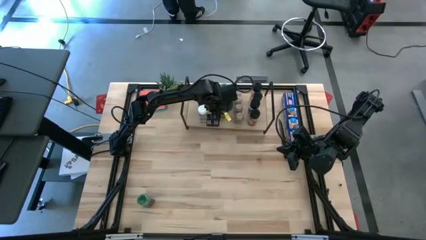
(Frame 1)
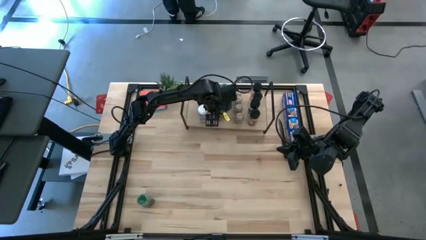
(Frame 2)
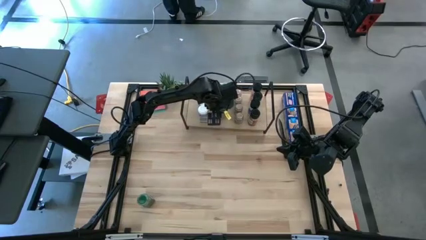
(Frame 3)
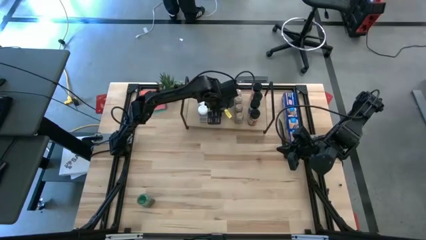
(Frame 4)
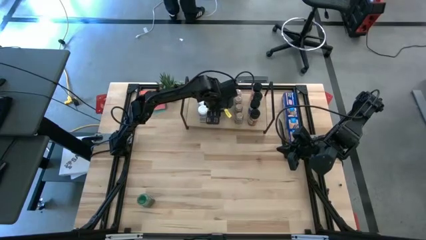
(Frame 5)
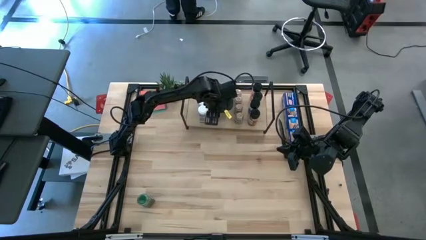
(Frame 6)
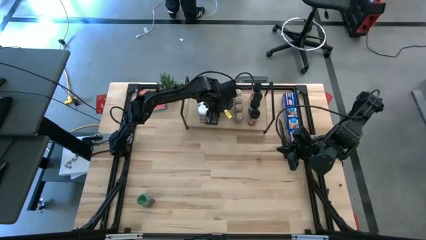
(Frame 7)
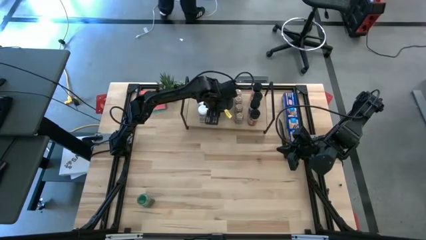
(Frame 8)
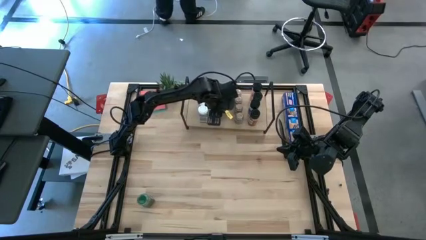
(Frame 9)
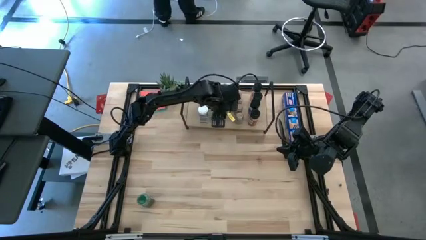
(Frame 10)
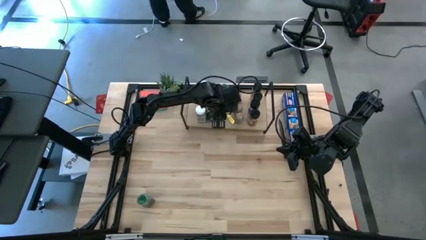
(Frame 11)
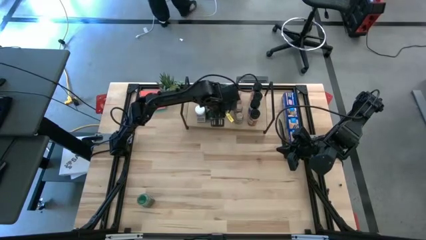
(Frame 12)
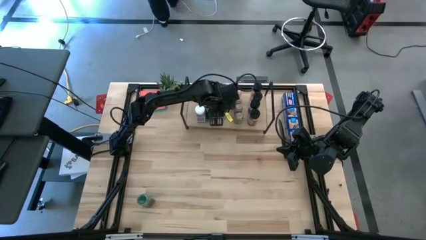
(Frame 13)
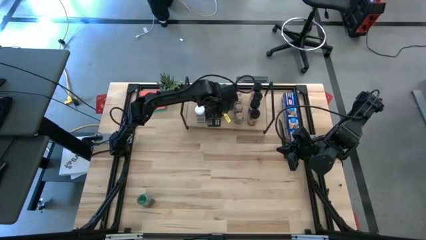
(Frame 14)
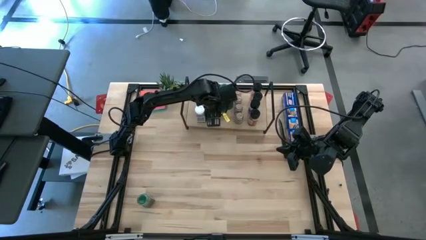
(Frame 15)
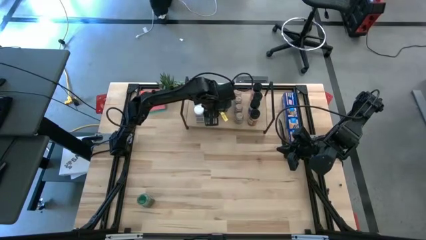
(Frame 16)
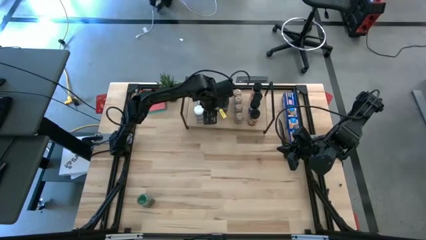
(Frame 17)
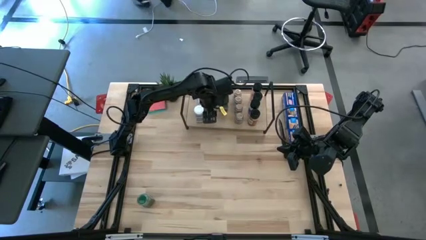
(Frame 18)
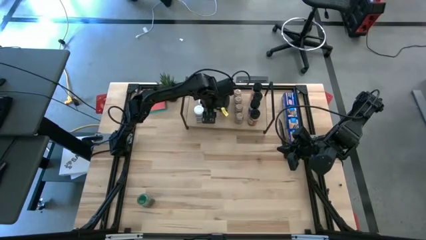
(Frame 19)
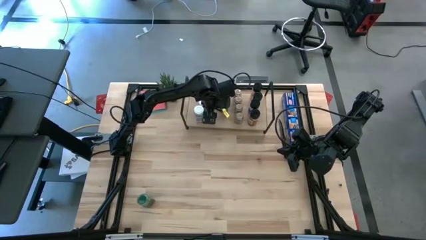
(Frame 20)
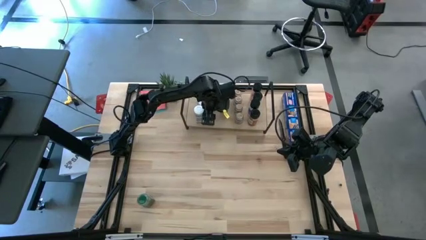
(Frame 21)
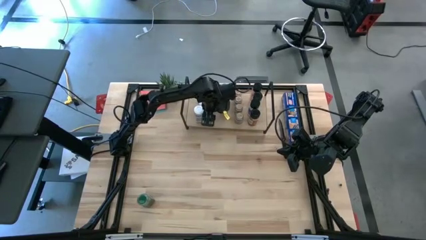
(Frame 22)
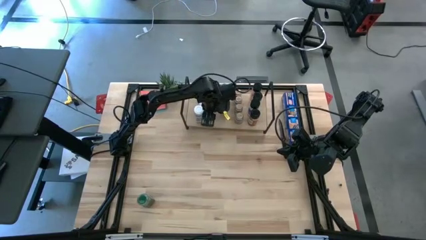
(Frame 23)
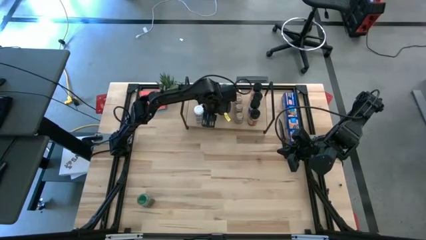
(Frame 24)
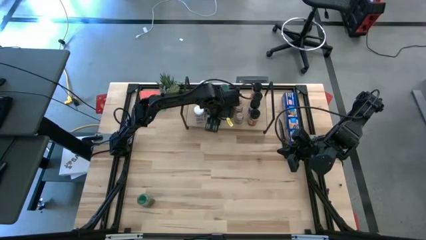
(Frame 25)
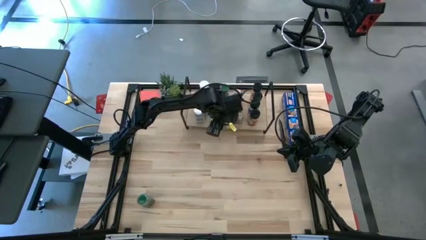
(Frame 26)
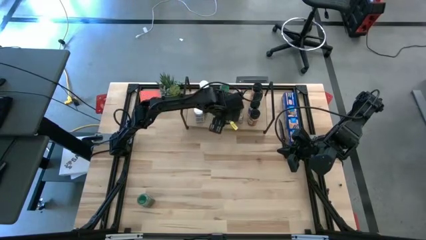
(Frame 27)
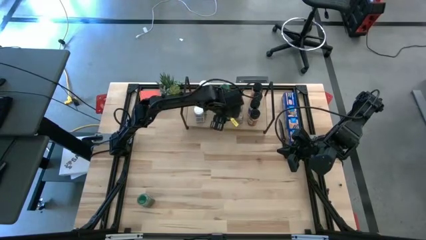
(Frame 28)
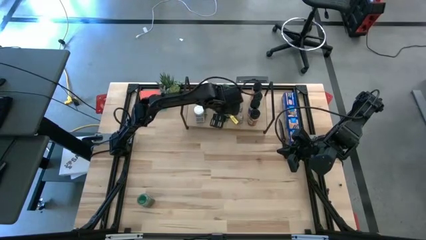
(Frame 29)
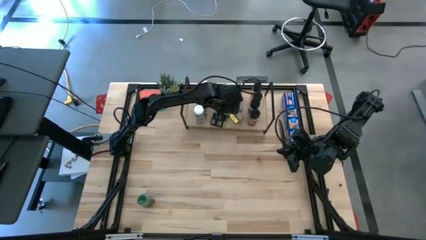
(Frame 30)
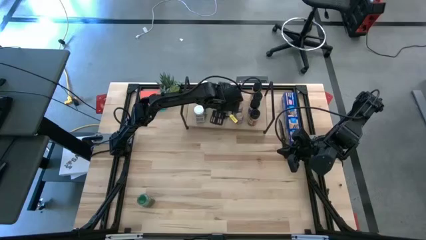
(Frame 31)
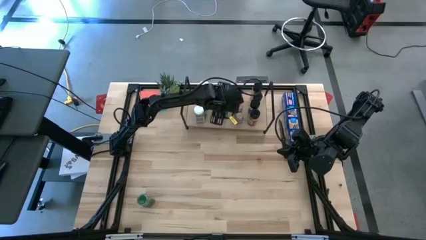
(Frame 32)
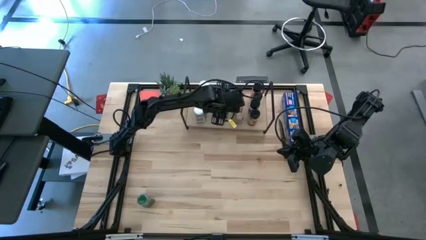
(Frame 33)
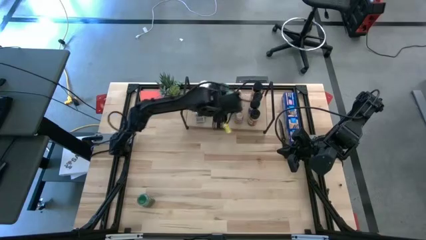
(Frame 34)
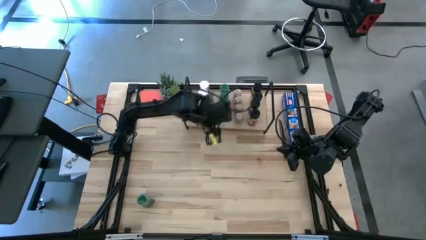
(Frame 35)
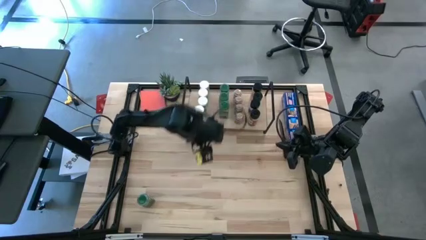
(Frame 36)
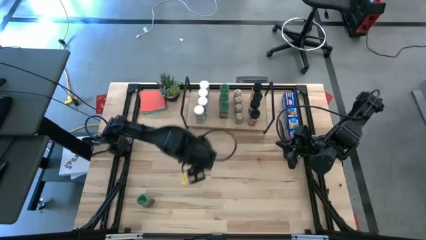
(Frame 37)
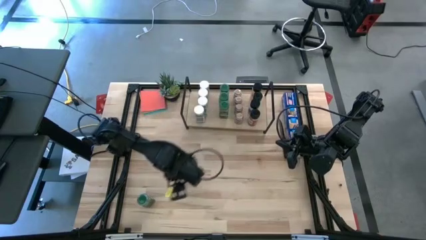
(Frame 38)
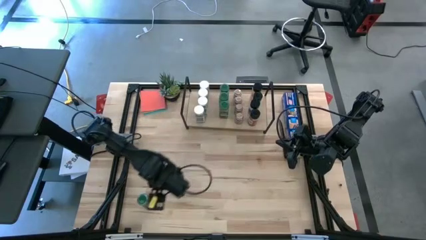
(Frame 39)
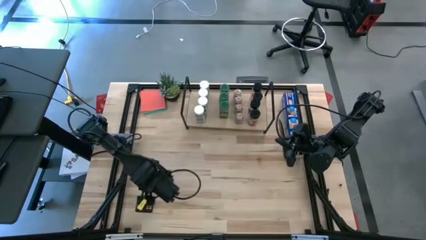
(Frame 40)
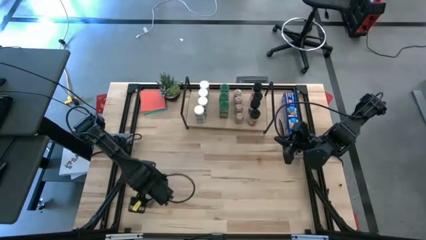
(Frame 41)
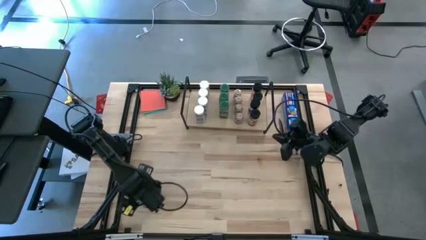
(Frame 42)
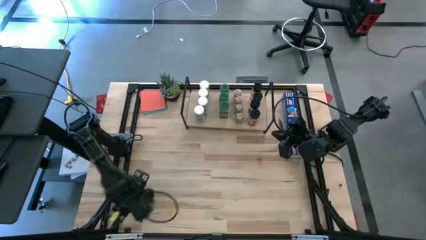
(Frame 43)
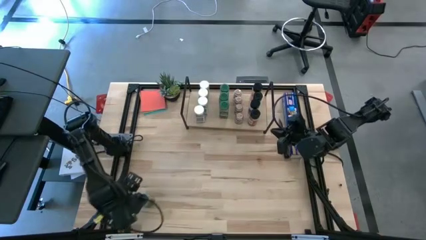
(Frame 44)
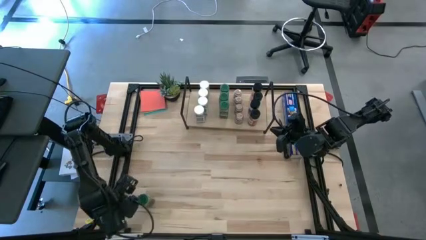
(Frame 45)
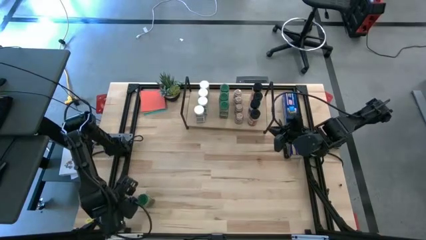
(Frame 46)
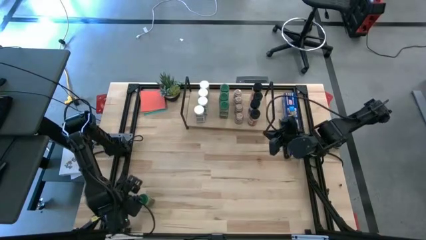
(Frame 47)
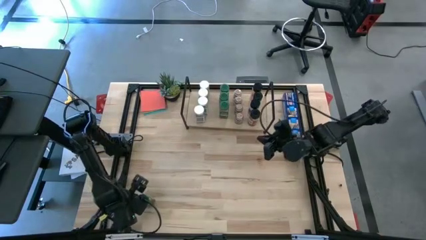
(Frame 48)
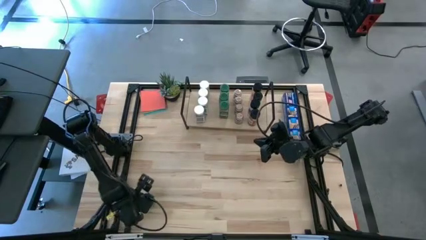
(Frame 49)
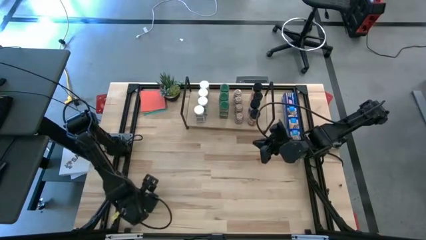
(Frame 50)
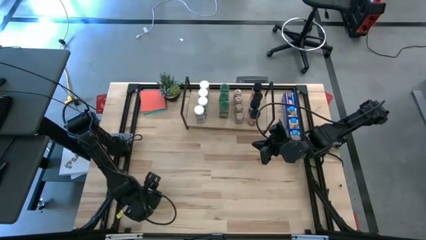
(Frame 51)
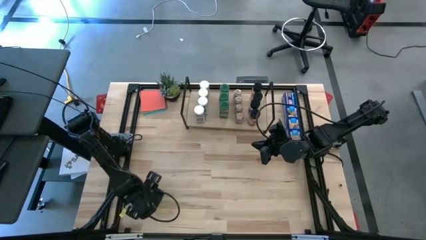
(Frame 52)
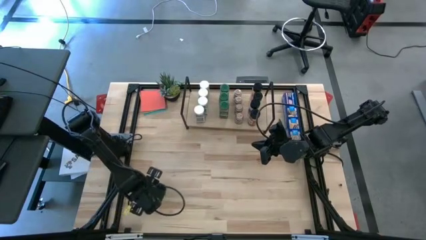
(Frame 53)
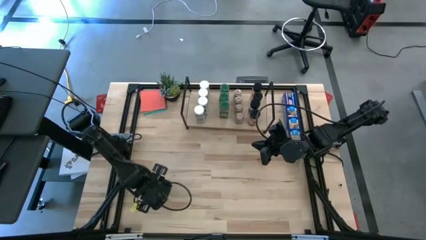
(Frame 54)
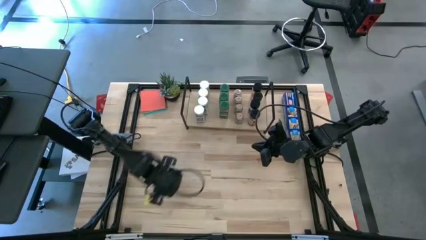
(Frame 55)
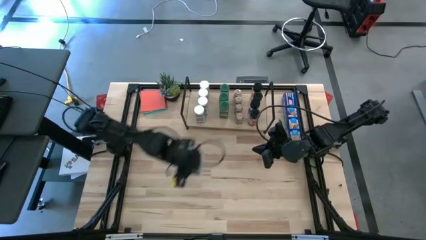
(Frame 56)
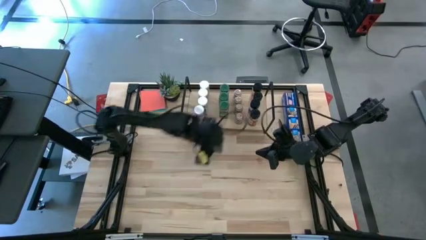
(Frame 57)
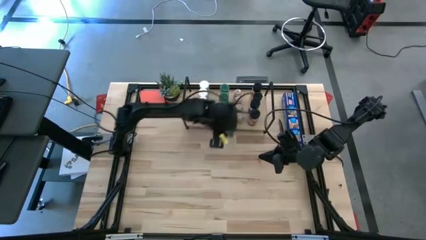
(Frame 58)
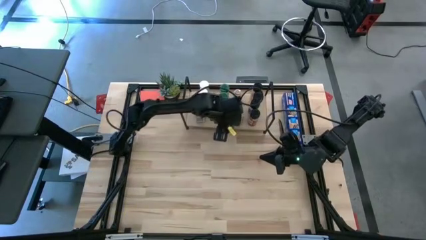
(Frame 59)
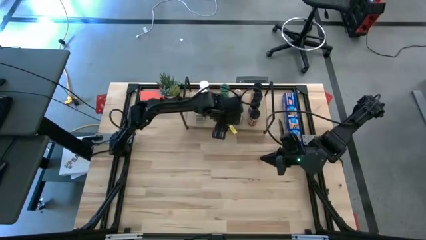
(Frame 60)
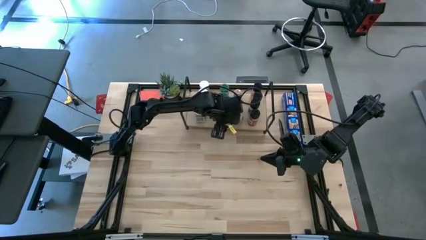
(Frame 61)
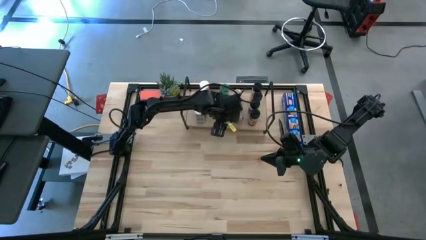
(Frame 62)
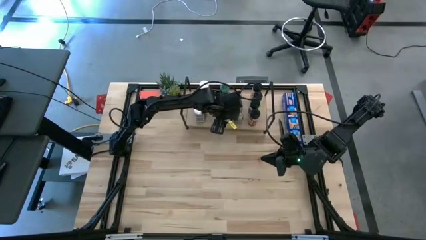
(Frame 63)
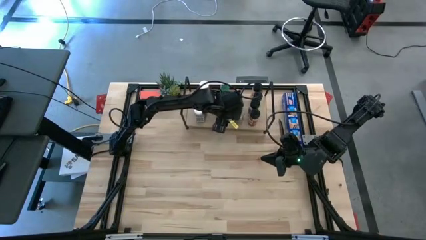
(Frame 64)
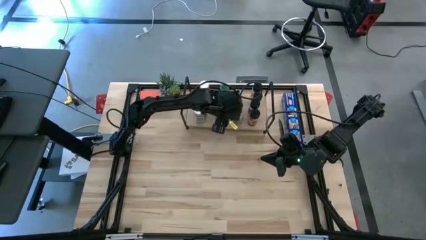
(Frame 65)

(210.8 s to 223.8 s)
Task: Shelf spices
Put the green seasoning bottle on the shelf, aligned with the other green bottle
